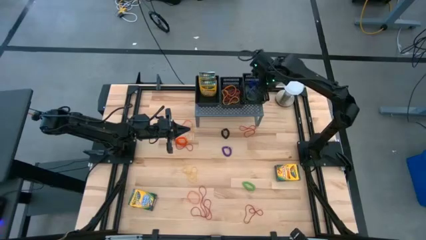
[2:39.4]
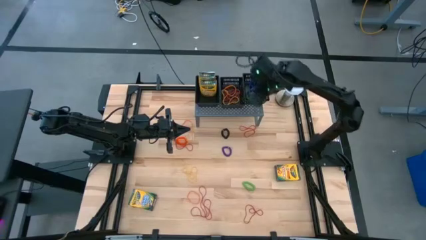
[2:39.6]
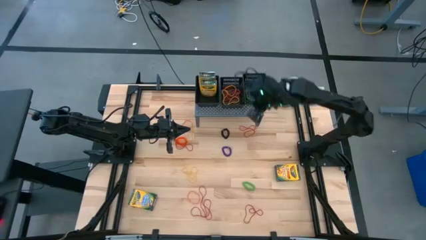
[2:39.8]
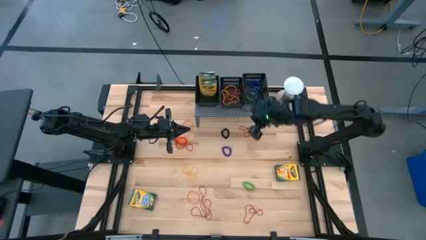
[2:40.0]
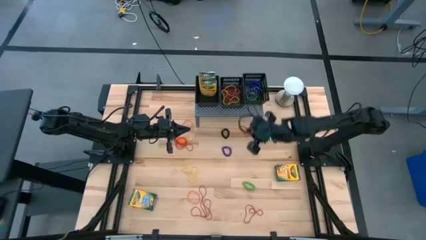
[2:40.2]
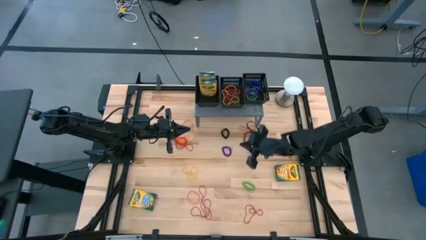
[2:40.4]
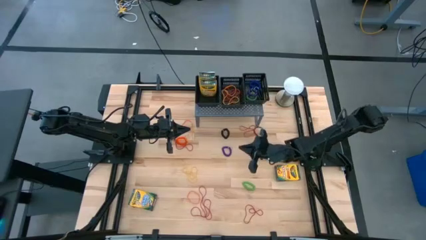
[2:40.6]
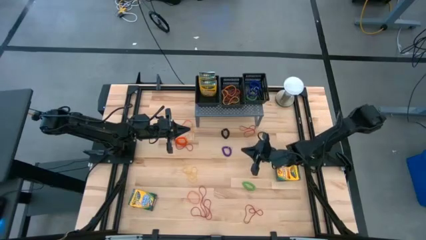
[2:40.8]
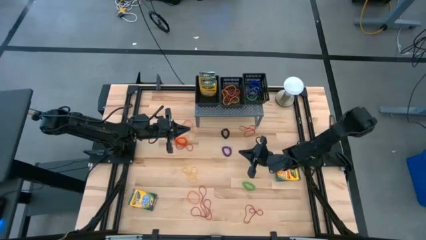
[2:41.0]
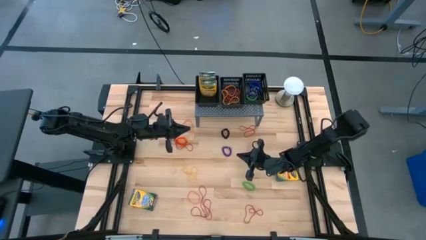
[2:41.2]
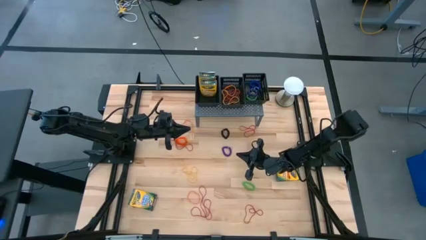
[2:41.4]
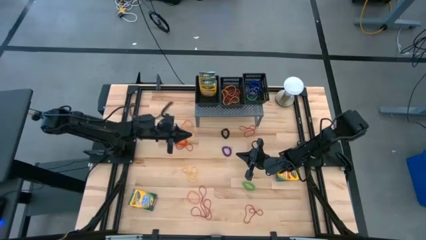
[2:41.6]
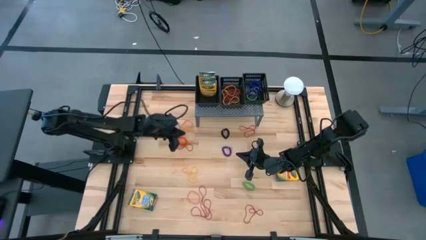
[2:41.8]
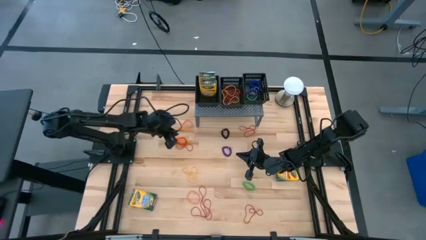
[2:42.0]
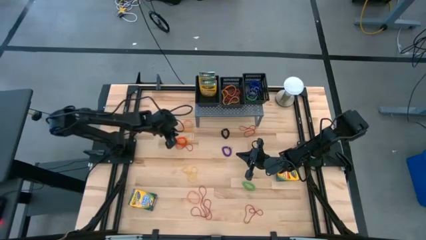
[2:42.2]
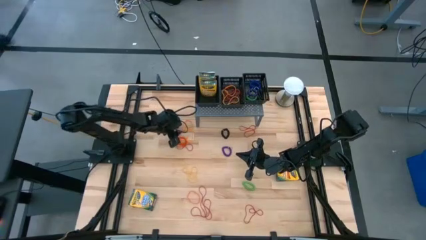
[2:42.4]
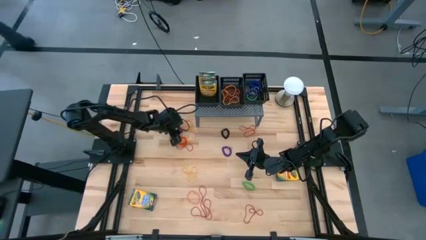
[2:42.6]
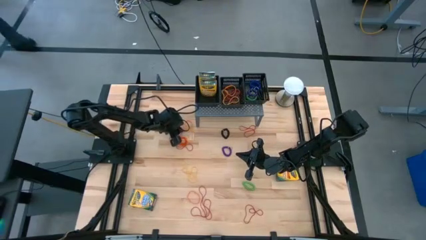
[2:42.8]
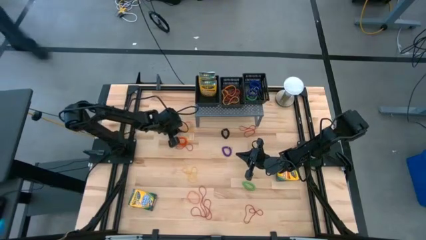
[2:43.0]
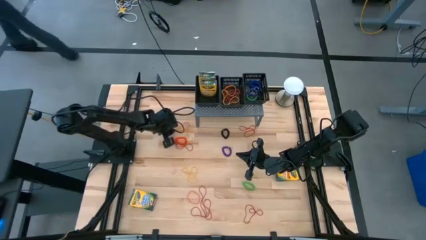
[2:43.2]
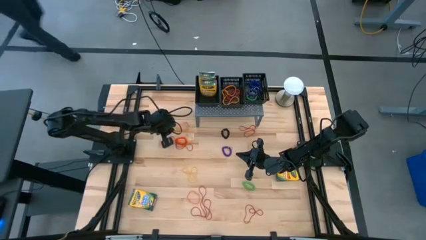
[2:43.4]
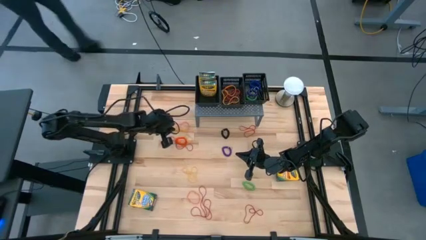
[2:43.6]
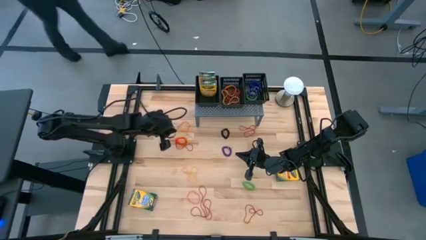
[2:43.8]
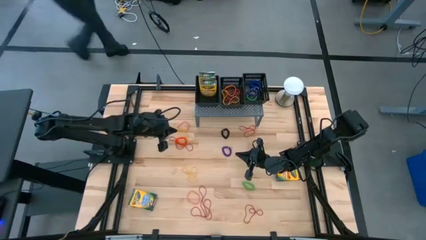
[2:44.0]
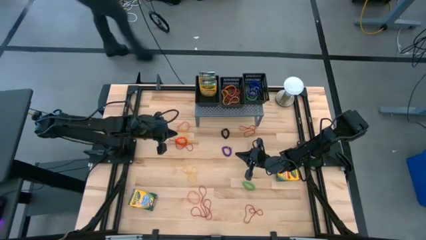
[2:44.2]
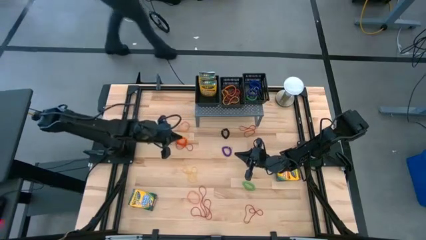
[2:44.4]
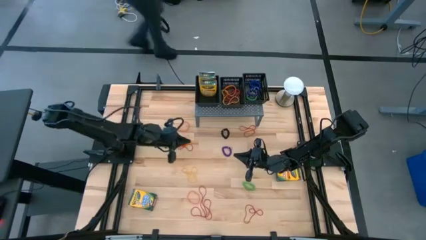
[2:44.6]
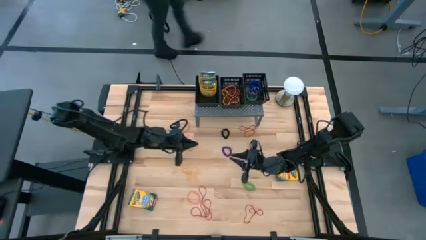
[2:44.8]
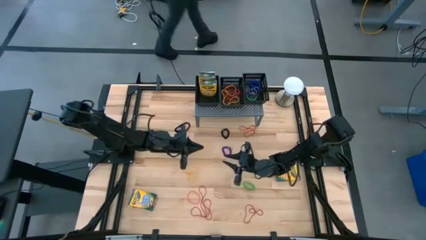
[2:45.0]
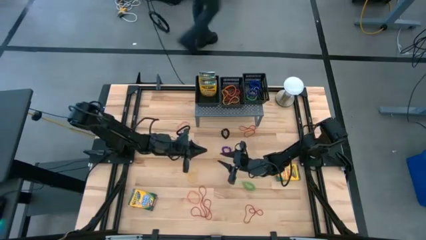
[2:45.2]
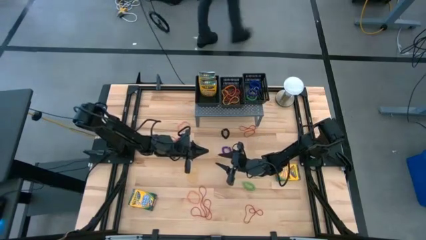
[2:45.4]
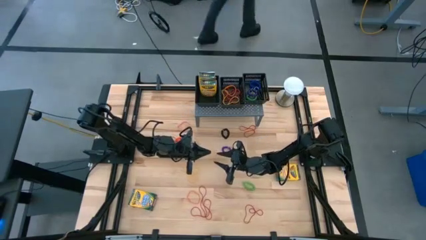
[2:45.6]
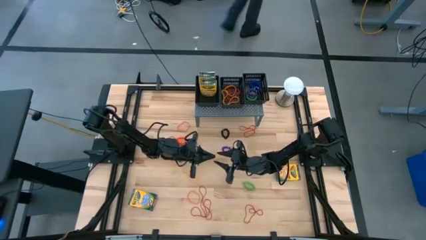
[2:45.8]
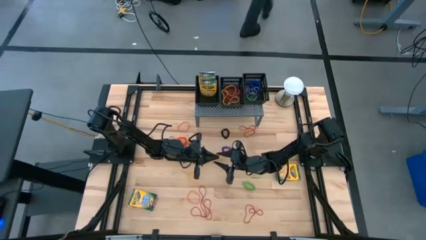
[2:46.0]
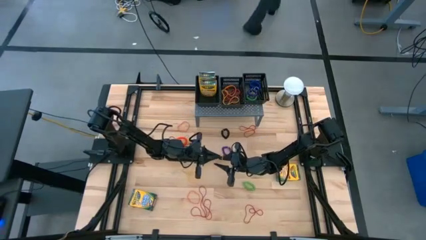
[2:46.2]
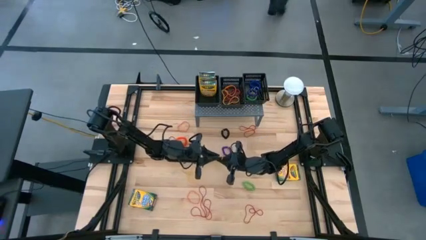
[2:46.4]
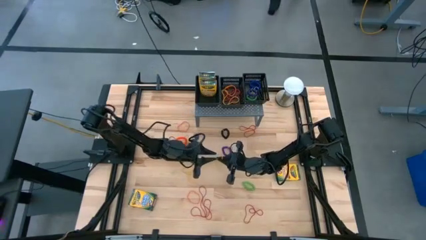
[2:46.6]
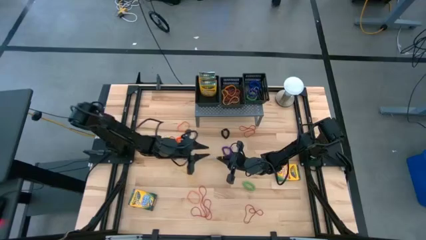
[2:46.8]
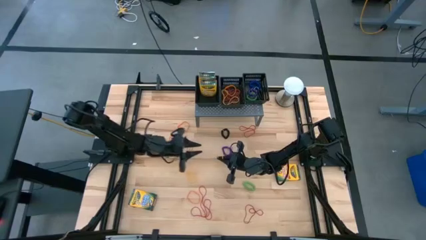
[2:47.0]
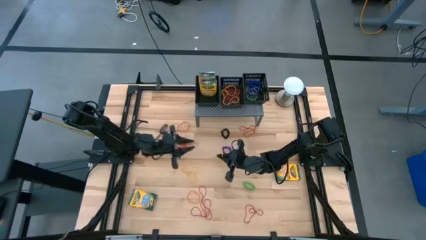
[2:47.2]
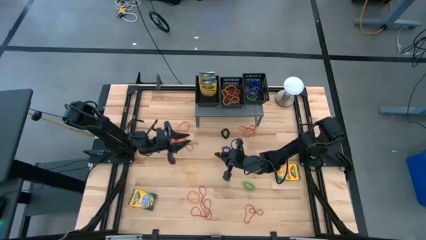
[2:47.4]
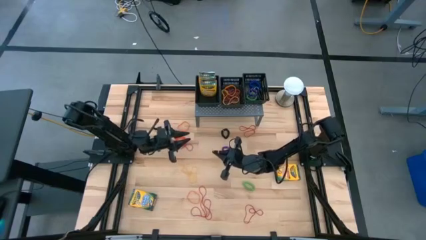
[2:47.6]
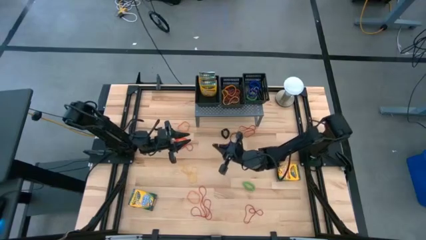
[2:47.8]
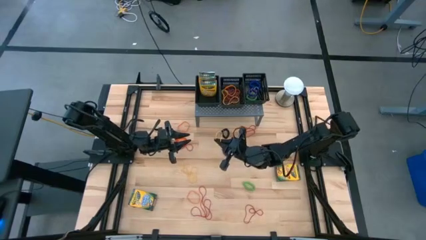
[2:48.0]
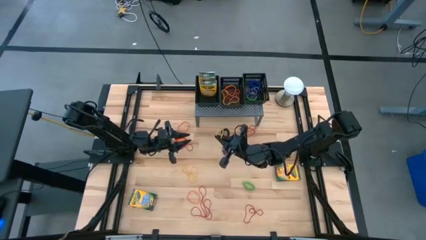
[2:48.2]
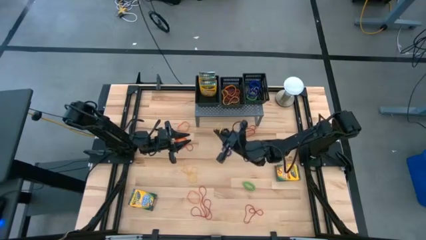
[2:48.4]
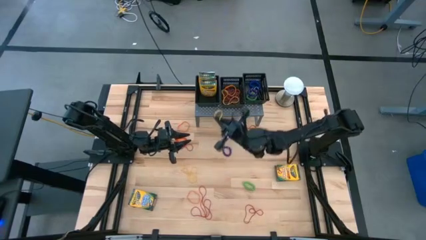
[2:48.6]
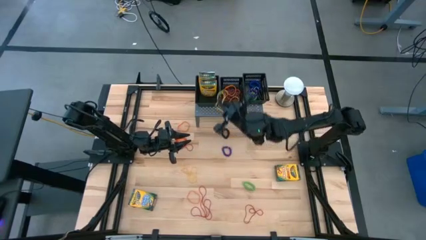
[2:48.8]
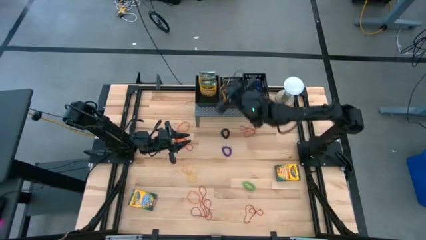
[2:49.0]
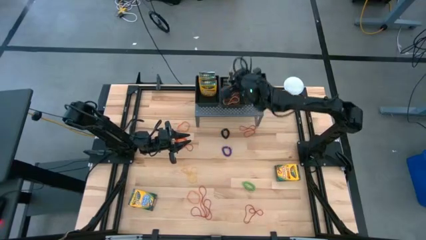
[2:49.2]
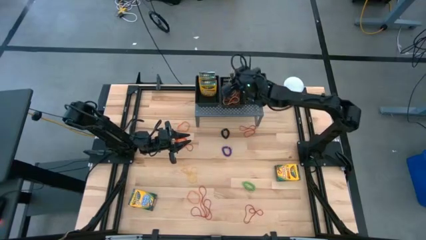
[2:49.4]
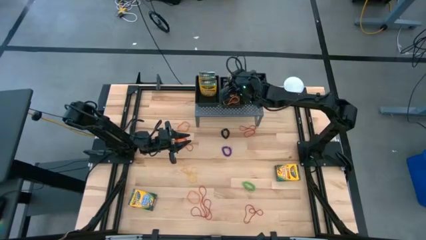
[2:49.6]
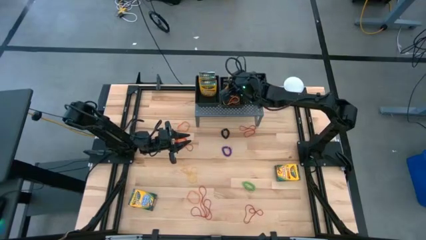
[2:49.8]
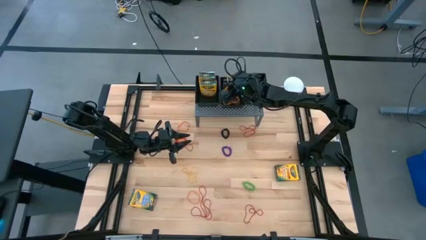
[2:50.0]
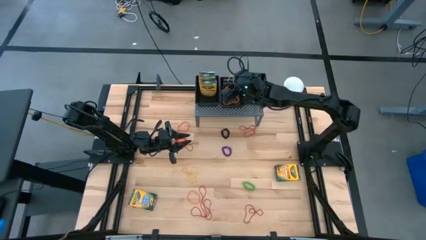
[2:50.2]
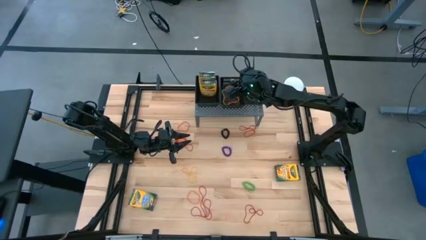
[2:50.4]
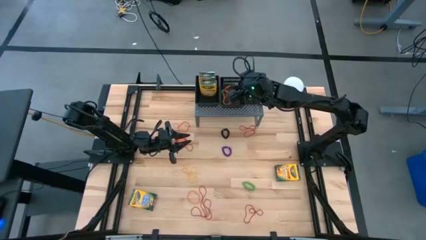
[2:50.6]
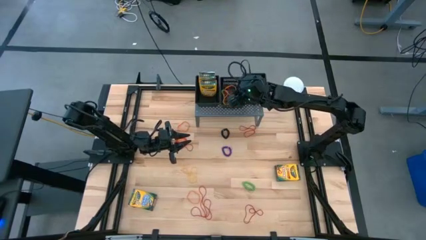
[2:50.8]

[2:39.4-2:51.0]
Task: Sort rubber bands into baskets
Put the yellow rubber band into the middle black basket on the shelf

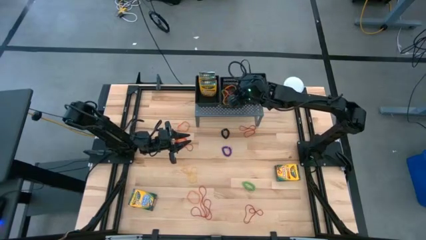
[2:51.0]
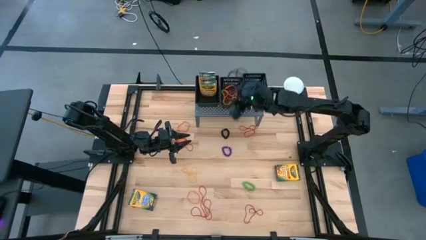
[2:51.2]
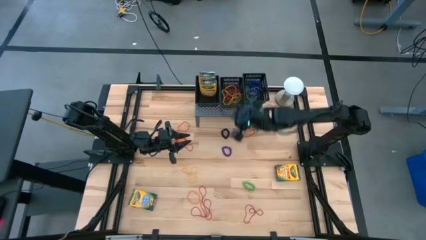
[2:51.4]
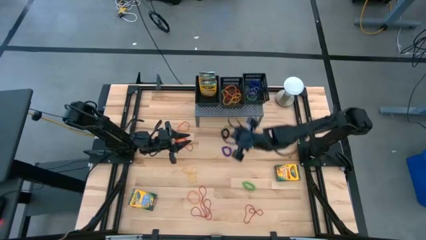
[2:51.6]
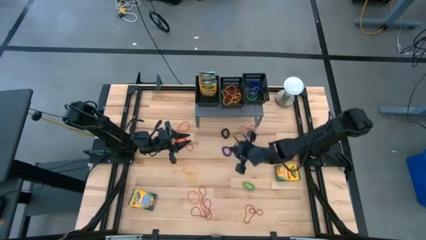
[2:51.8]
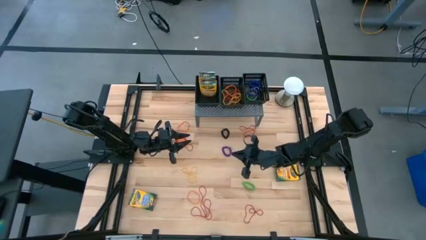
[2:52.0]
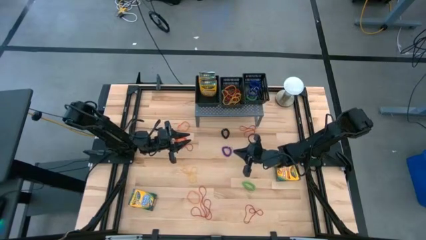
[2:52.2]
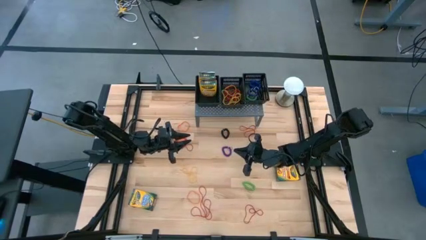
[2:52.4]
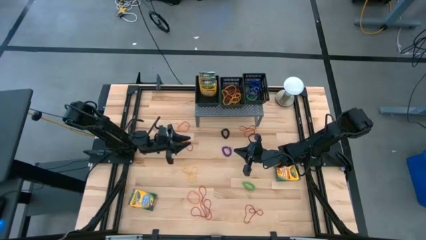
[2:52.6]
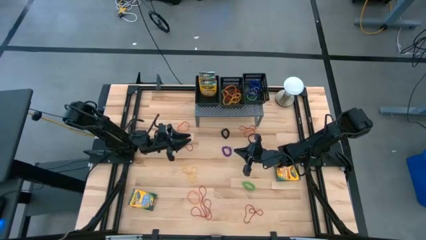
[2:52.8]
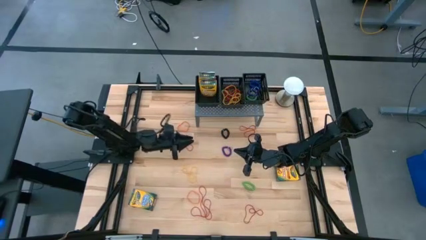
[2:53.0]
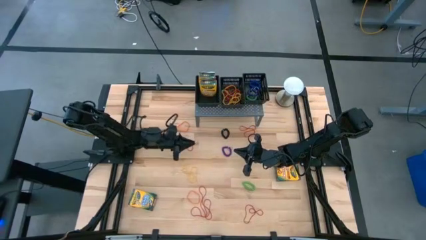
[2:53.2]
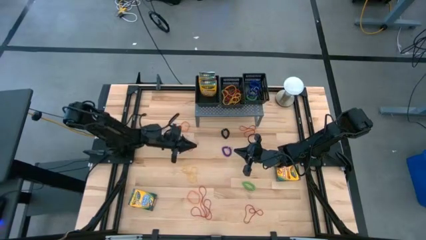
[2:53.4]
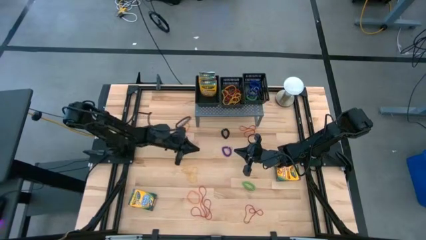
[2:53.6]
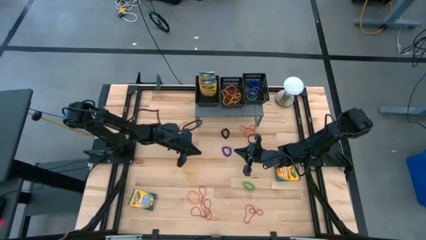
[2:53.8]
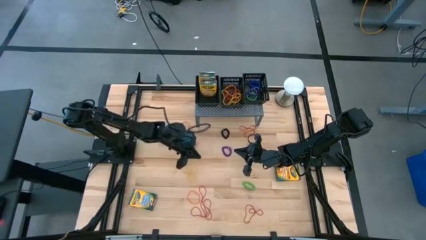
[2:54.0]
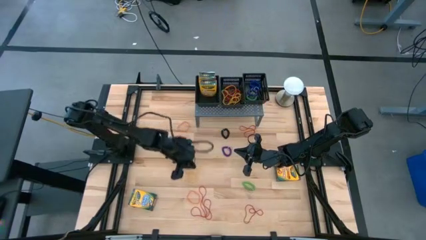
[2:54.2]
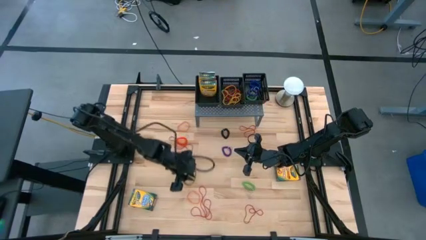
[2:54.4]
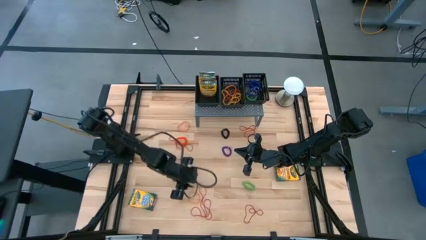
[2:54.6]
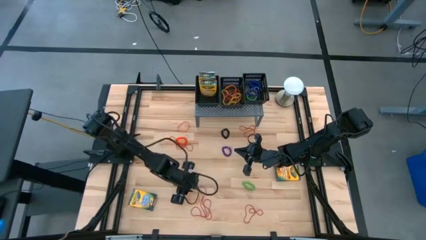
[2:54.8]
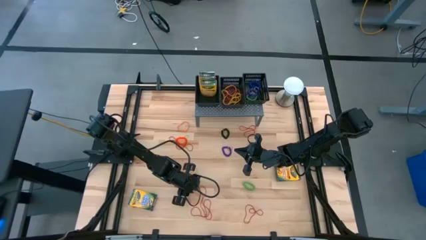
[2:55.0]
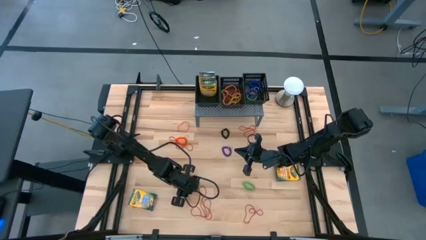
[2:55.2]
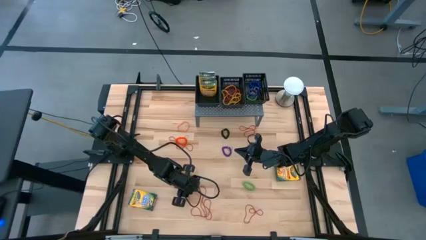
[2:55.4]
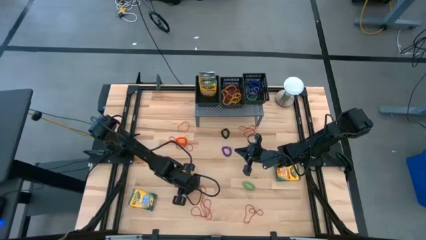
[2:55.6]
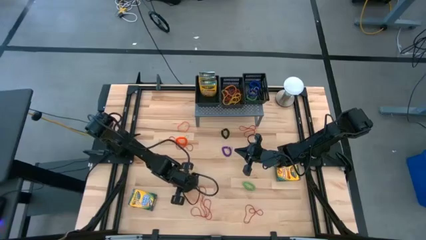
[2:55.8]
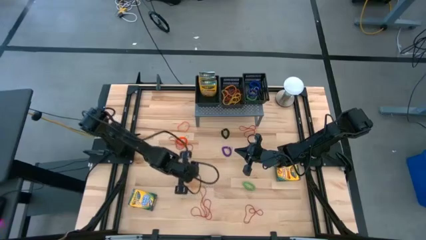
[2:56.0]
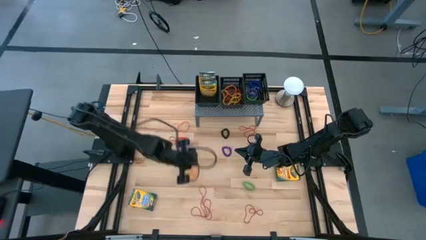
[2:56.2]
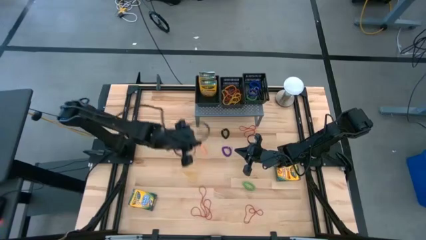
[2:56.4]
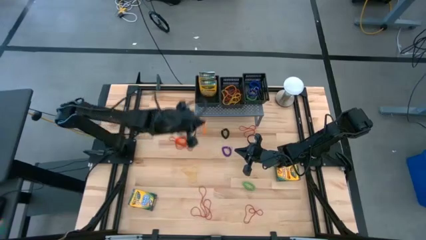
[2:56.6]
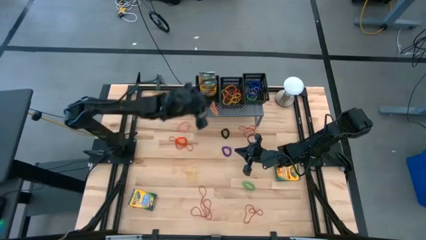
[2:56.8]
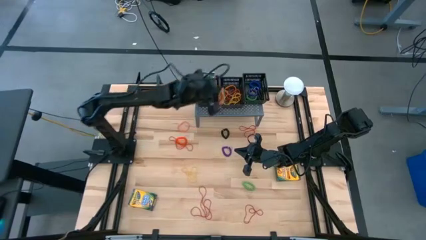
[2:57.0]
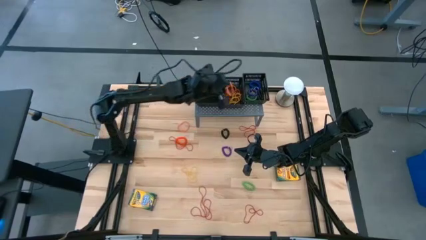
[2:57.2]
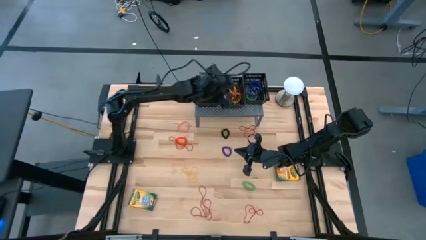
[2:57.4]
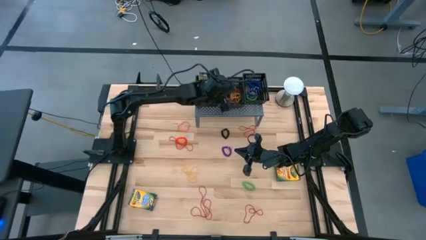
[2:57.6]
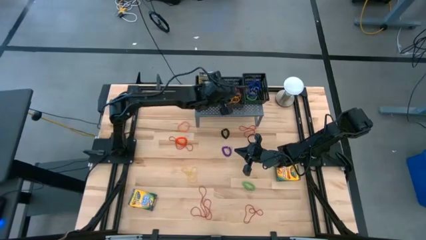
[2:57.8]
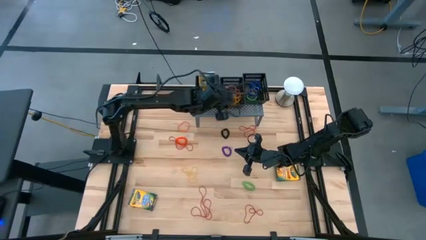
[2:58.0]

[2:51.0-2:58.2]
Put the orange rubber band into the middle black basket on the shelf
